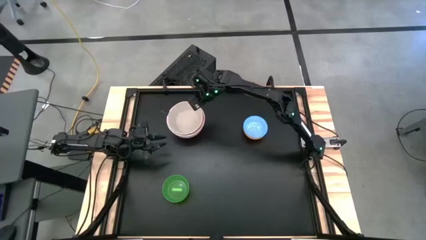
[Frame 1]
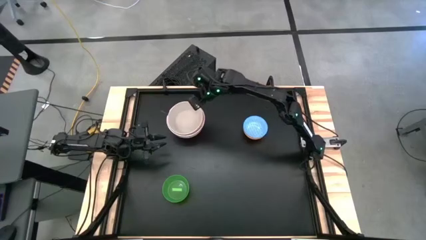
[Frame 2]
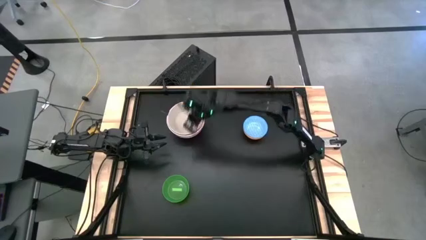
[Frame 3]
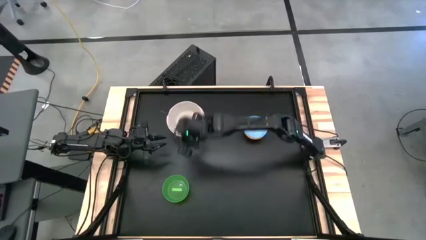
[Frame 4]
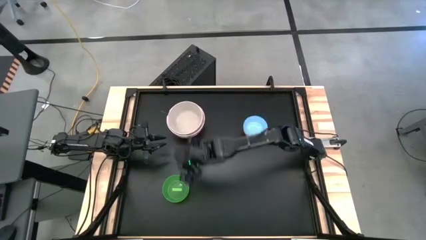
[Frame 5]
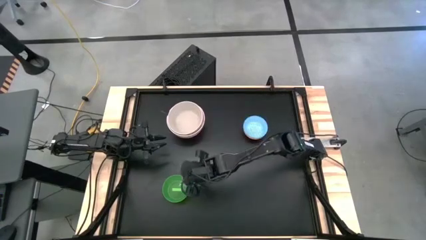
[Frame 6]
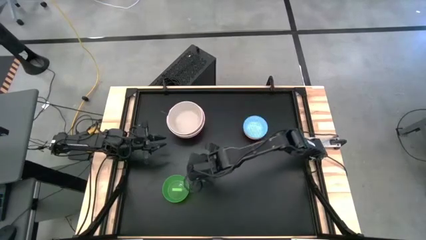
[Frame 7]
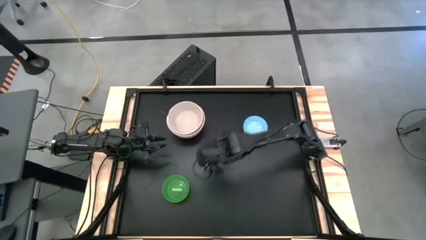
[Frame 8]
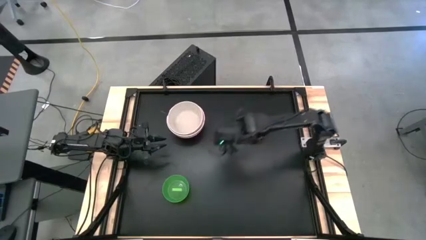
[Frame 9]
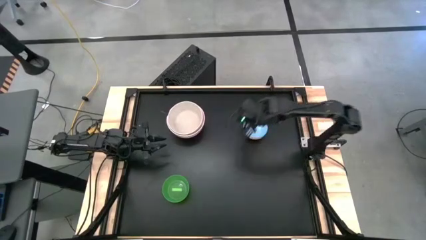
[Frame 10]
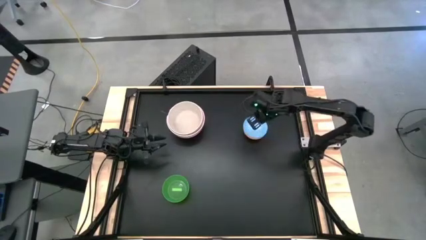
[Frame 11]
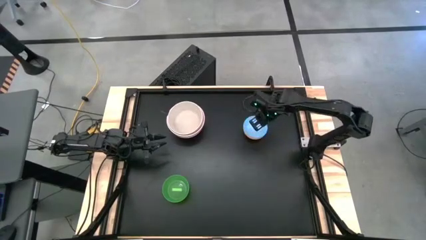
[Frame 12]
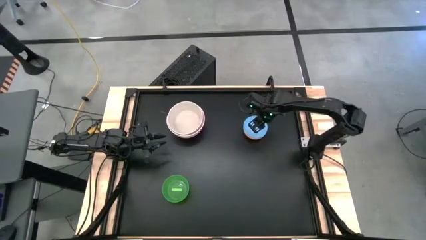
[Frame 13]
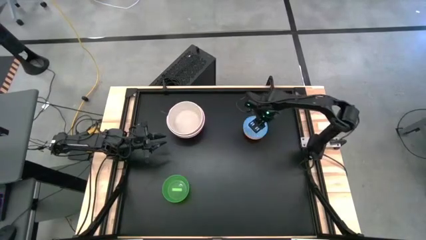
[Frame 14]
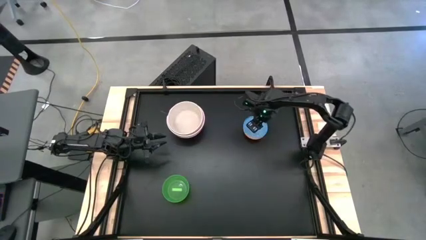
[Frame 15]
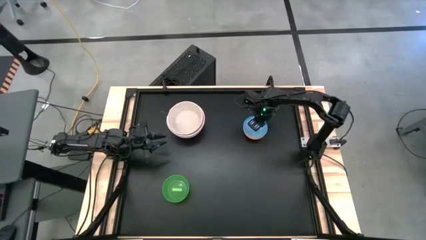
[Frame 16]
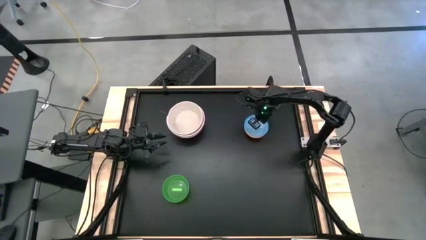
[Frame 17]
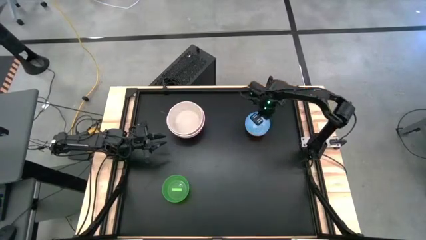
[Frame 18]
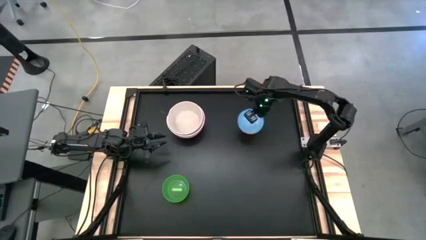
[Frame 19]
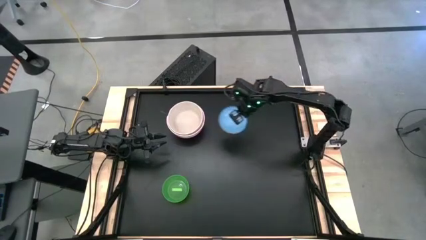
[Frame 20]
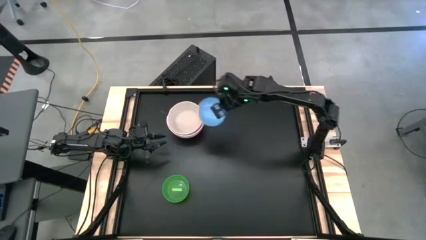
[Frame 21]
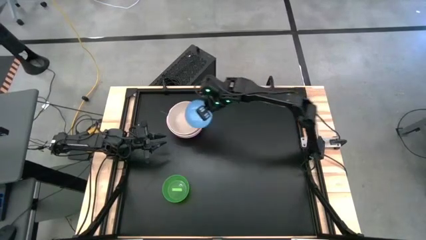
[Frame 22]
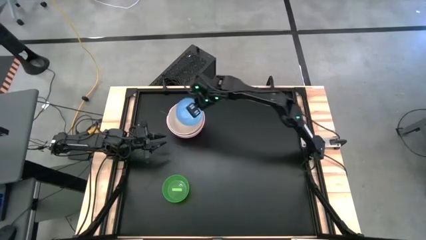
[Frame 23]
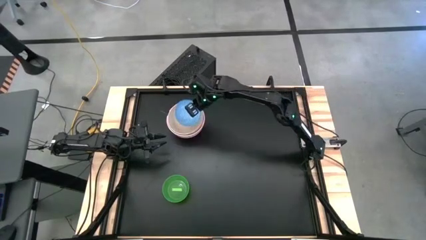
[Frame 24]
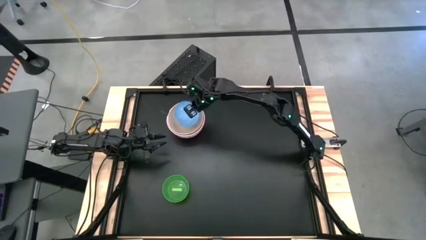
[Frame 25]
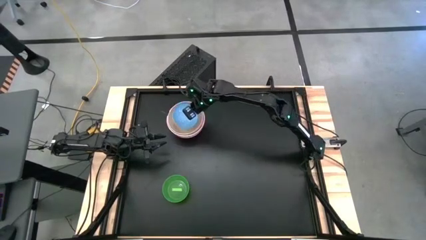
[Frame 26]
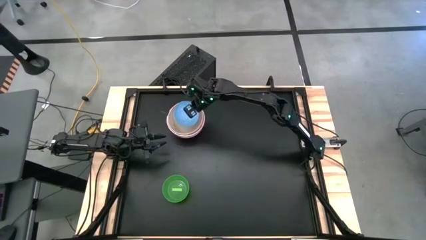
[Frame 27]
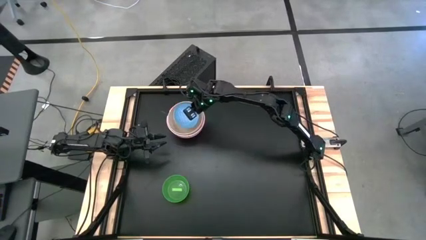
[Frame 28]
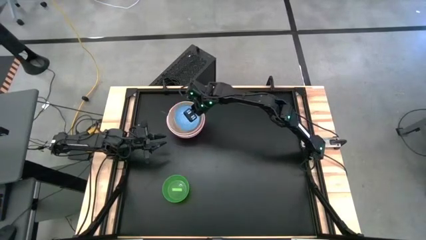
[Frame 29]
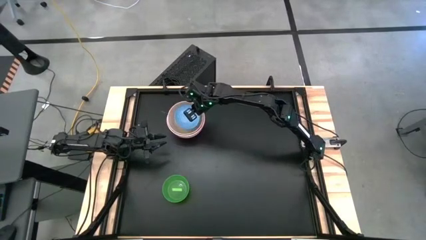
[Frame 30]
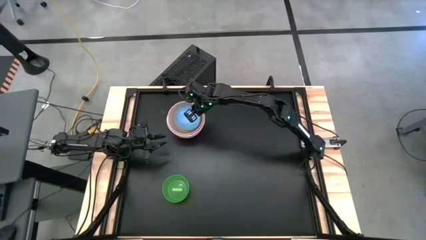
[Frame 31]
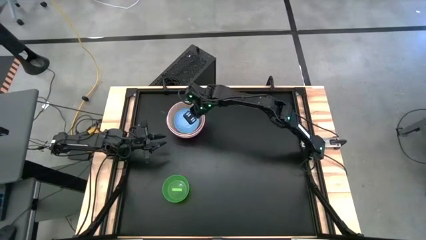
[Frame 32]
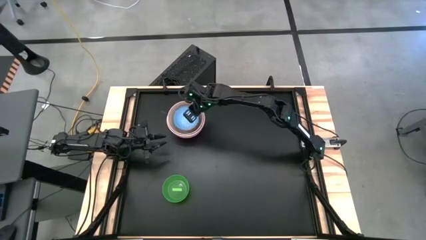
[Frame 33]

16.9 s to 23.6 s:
Stack the blue patterned bowl on the gray bowl

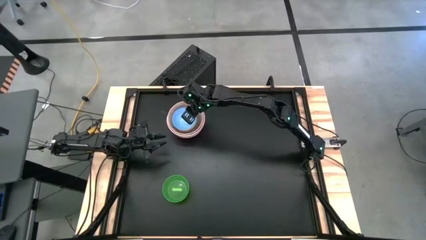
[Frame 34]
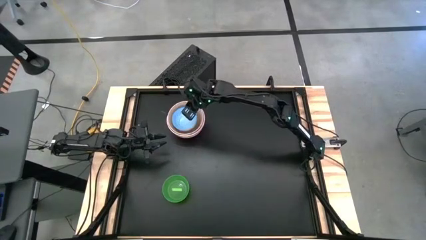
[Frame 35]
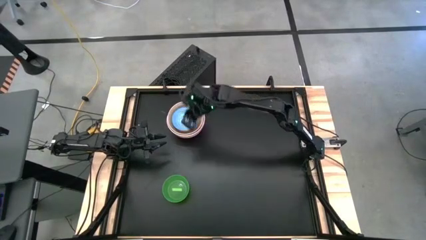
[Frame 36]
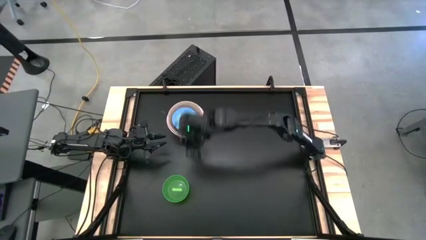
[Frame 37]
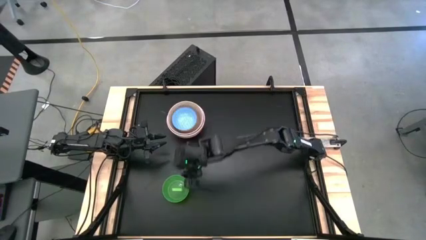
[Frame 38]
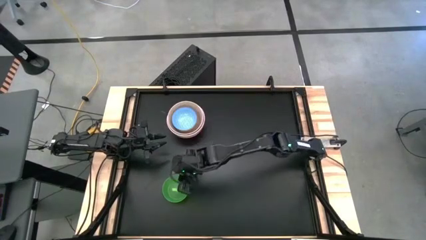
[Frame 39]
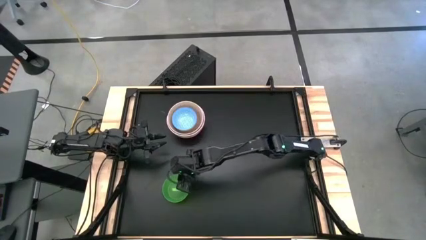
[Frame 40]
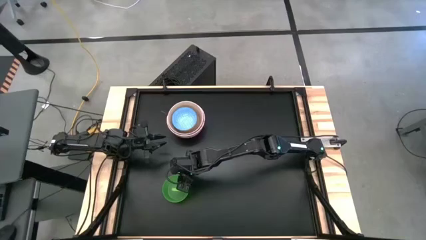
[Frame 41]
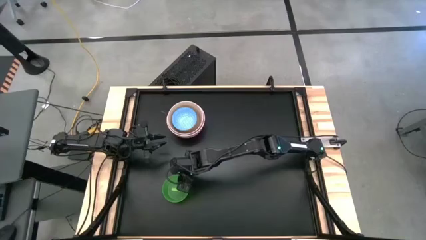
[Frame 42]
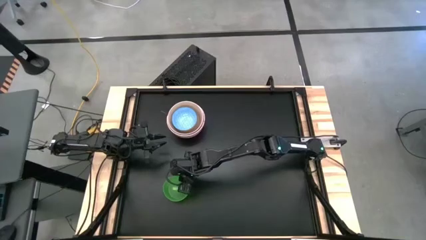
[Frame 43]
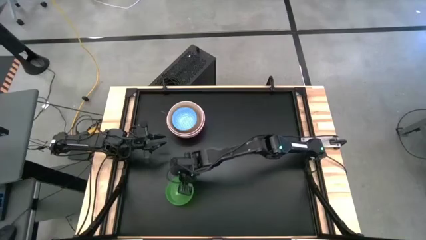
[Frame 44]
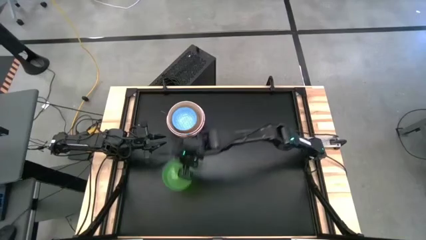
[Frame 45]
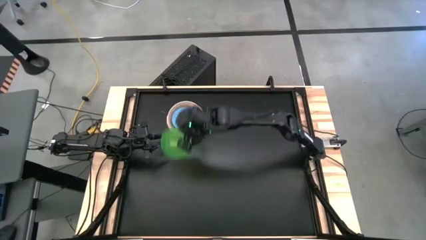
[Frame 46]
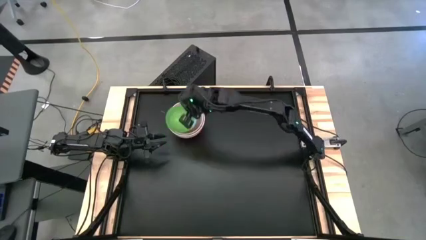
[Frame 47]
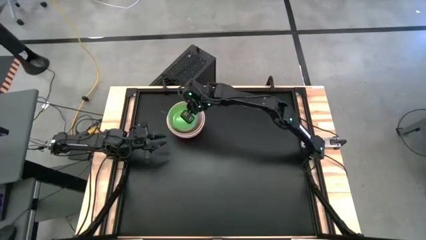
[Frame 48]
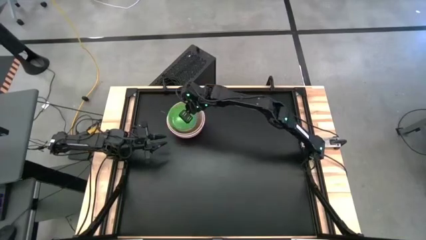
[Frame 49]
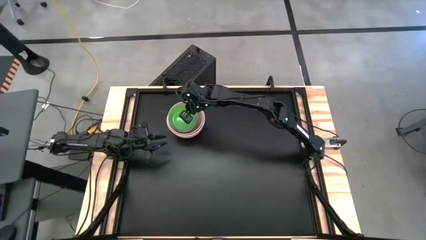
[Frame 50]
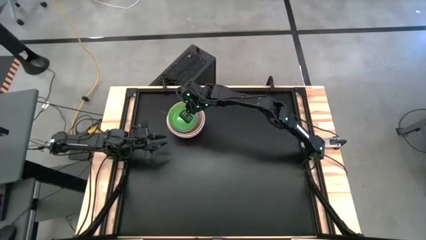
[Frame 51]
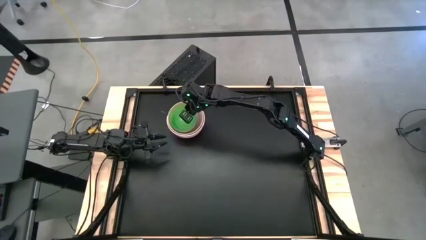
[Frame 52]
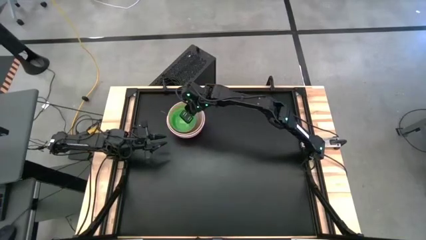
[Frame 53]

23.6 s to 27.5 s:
Stack the green bowl on the blue bowl

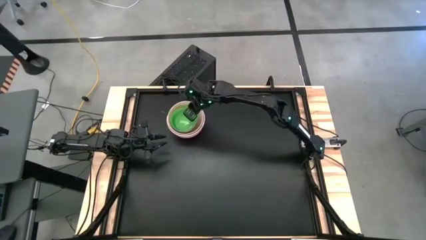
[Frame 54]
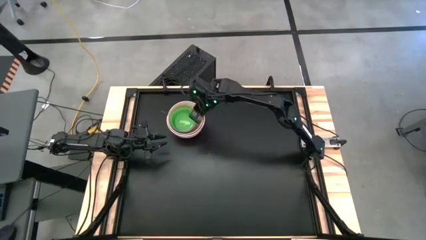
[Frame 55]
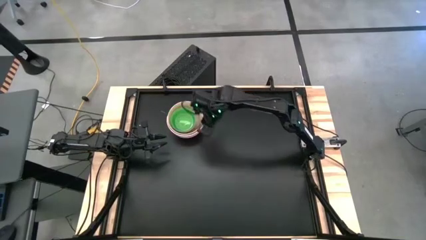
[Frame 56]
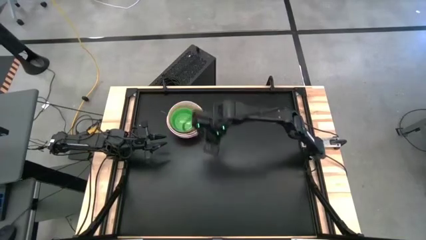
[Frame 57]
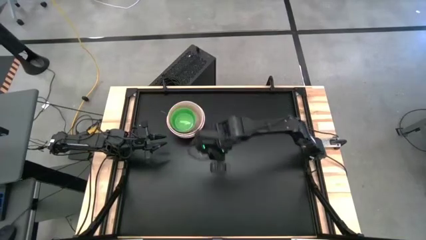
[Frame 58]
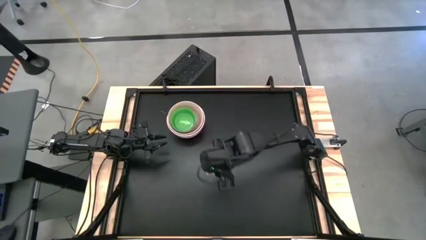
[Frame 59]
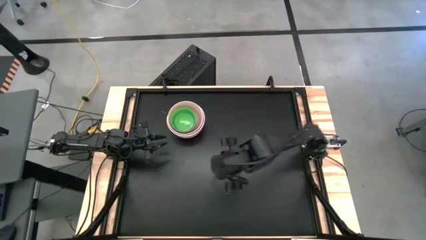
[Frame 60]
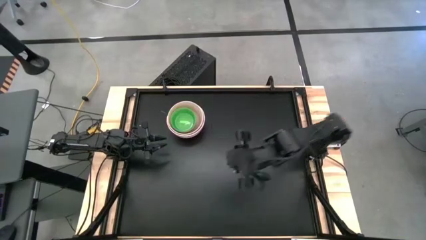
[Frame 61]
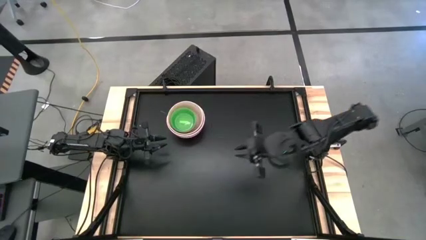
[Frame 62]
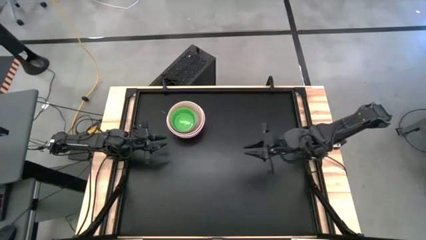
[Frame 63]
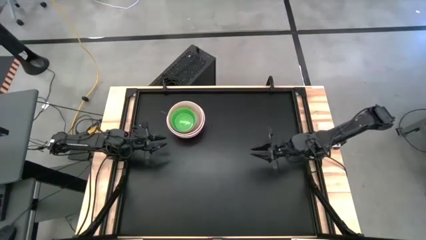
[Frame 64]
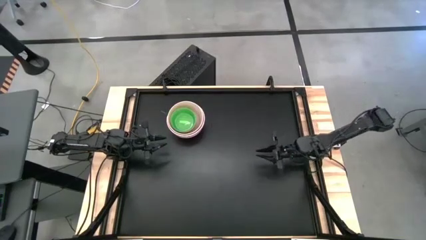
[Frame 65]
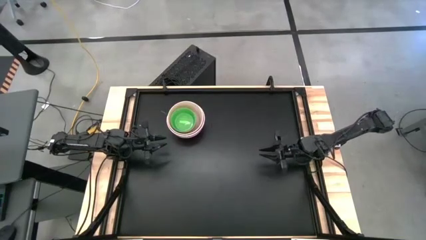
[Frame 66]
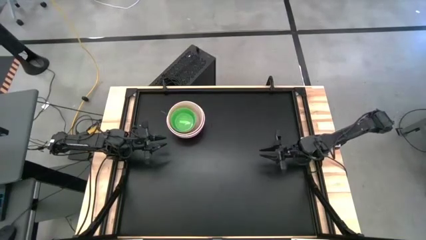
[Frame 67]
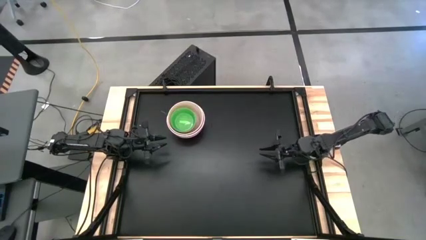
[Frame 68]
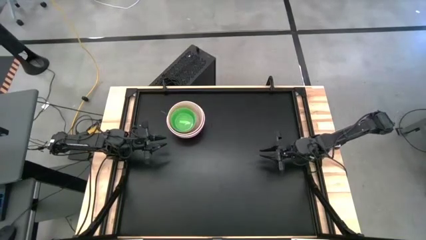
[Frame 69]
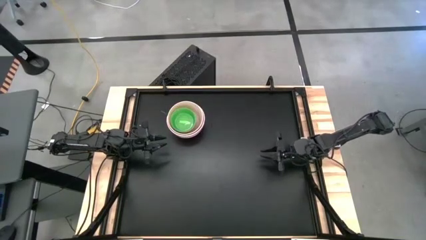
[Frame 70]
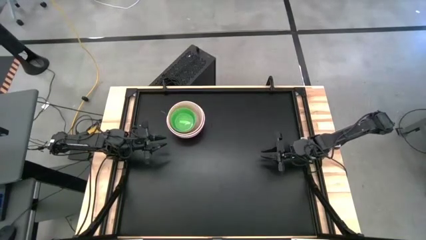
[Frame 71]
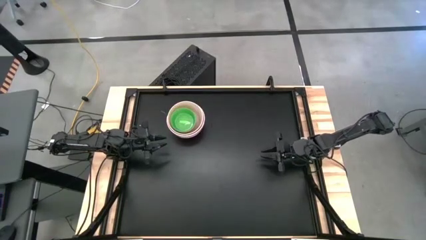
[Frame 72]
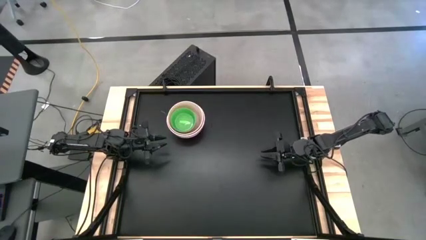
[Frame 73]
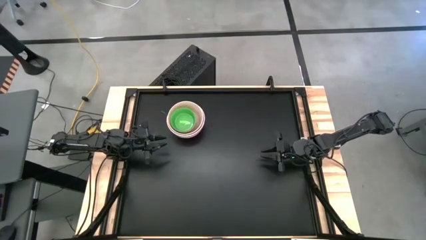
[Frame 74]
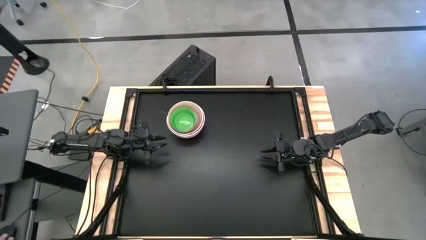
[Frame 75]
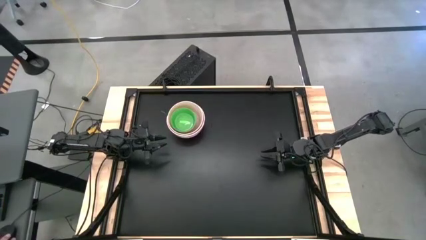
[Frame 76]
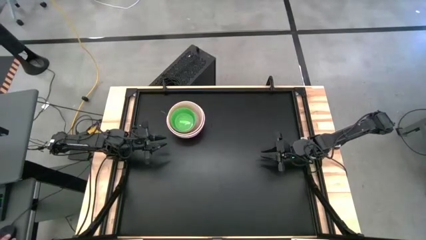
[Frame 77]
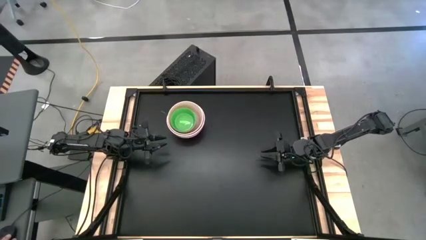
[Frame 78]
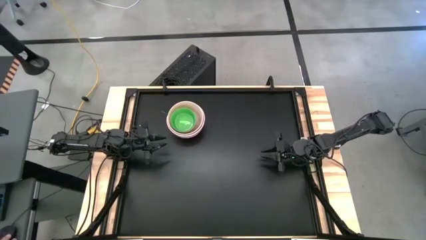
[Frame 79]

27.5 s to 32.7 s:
Return to Home Position
